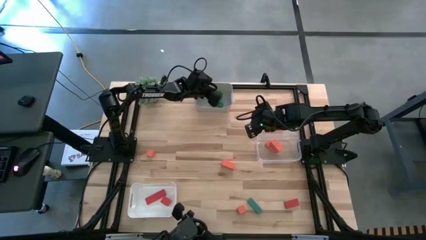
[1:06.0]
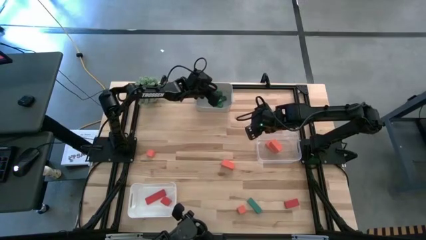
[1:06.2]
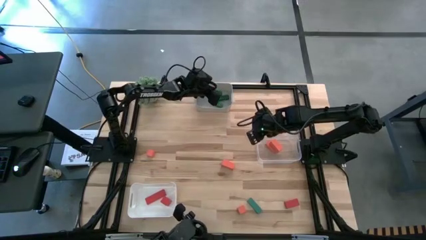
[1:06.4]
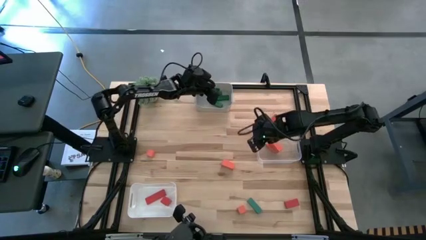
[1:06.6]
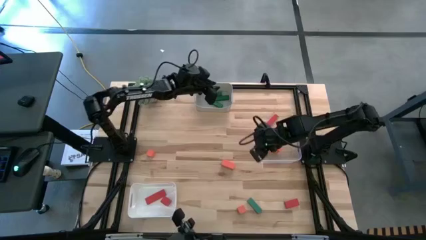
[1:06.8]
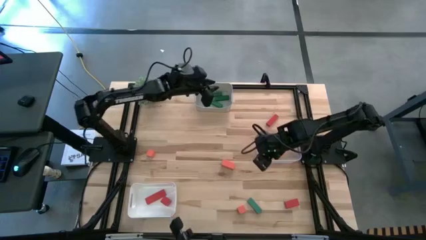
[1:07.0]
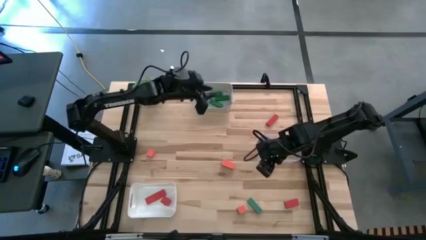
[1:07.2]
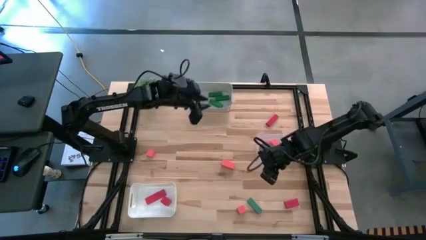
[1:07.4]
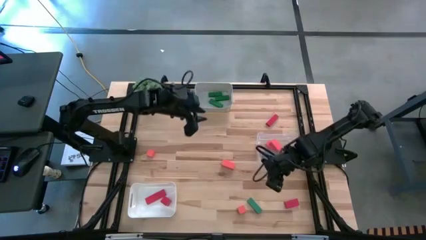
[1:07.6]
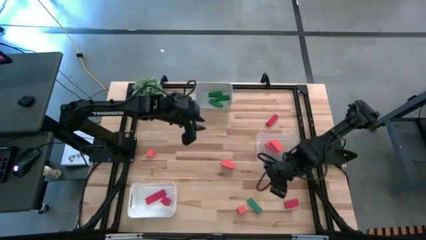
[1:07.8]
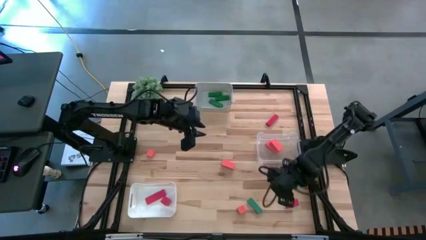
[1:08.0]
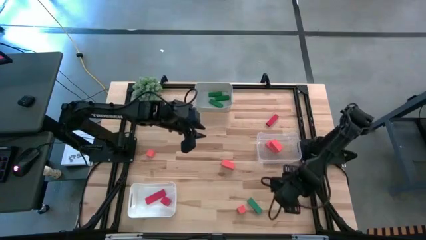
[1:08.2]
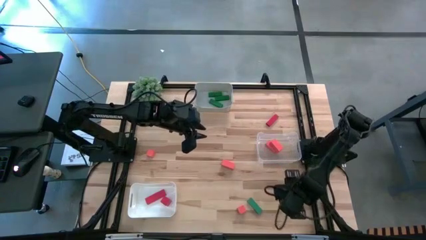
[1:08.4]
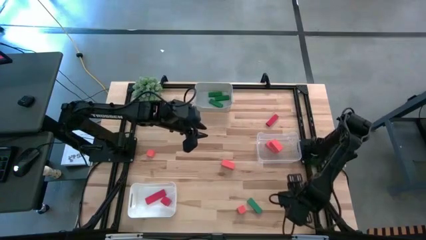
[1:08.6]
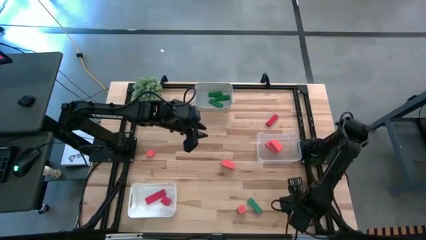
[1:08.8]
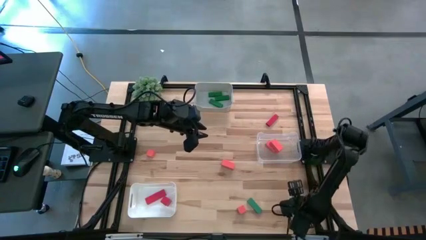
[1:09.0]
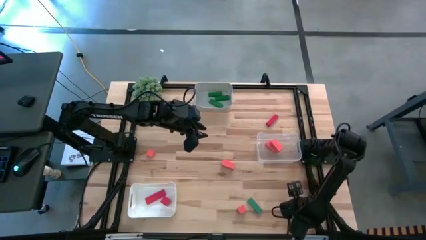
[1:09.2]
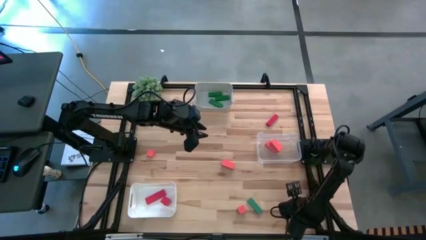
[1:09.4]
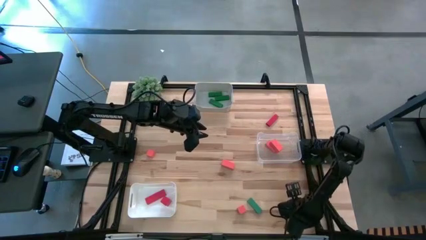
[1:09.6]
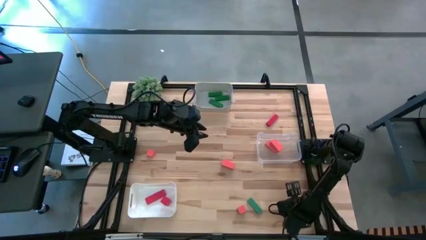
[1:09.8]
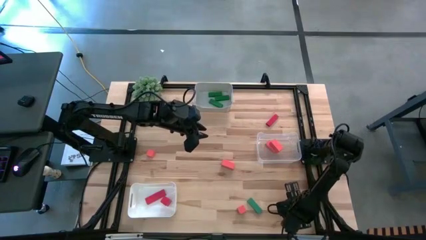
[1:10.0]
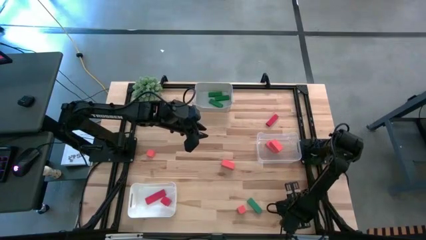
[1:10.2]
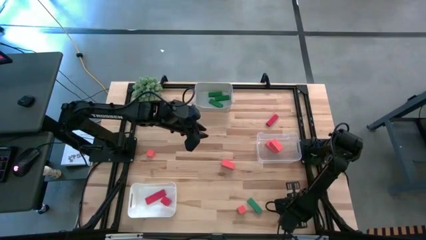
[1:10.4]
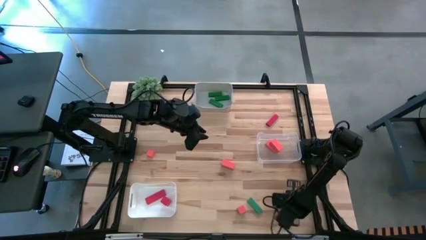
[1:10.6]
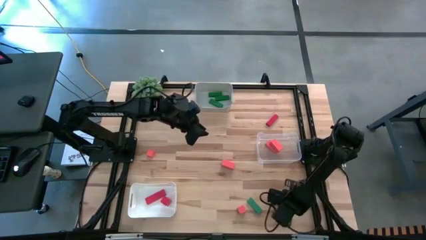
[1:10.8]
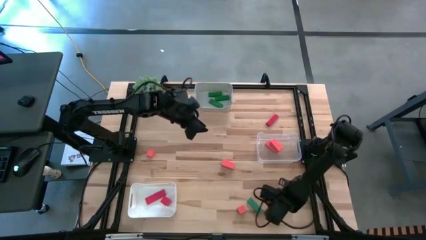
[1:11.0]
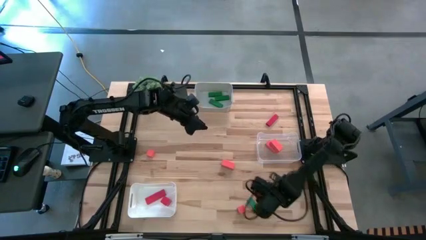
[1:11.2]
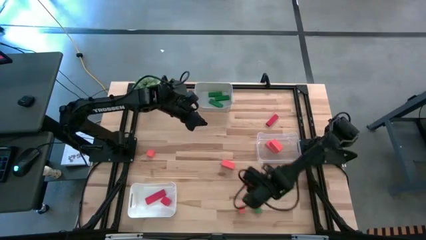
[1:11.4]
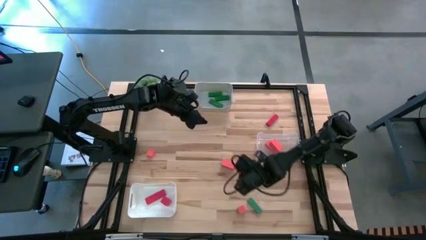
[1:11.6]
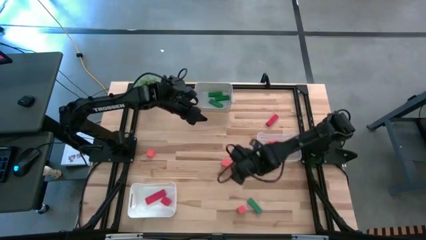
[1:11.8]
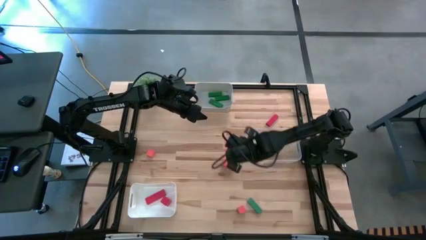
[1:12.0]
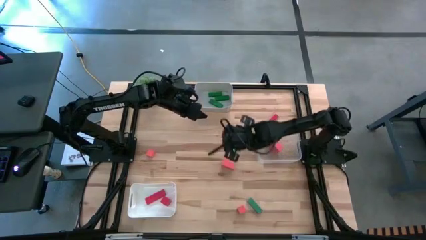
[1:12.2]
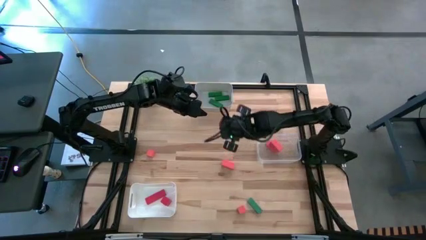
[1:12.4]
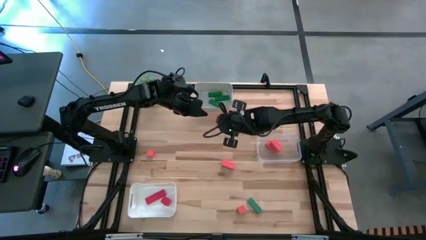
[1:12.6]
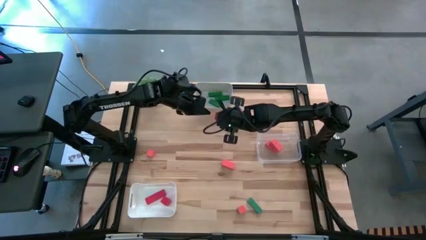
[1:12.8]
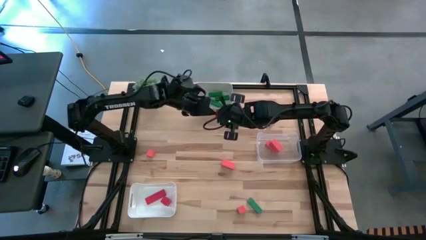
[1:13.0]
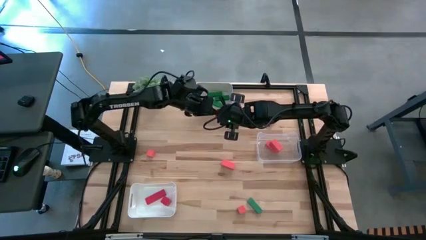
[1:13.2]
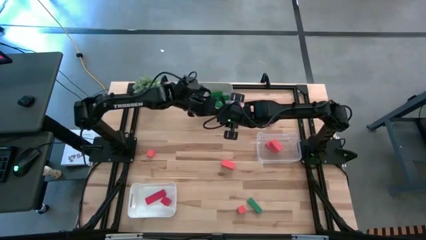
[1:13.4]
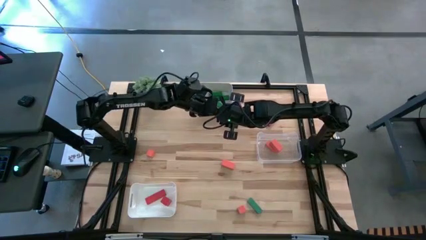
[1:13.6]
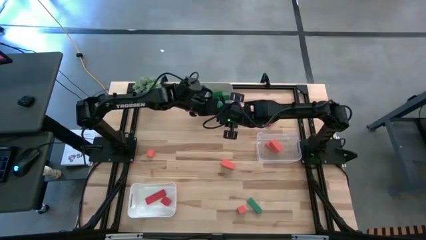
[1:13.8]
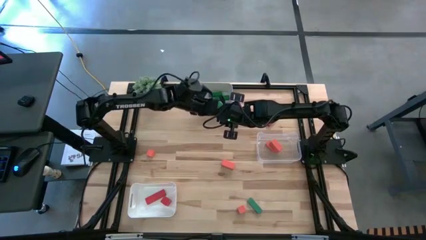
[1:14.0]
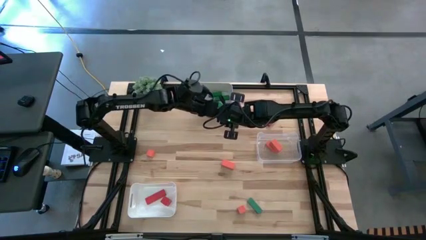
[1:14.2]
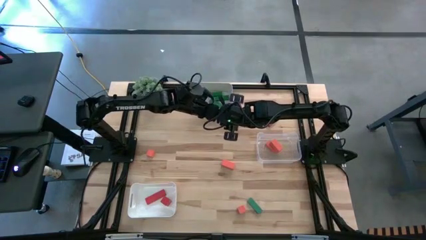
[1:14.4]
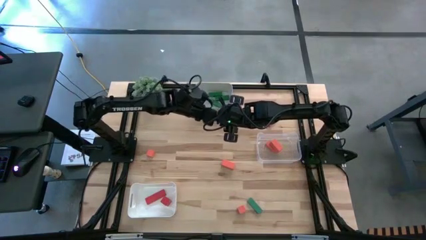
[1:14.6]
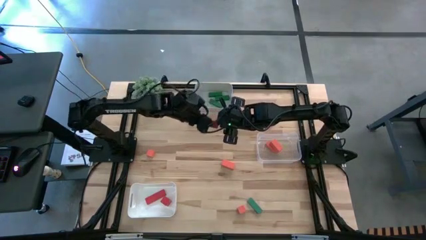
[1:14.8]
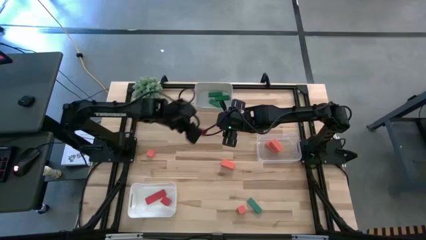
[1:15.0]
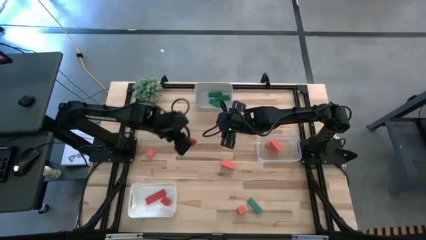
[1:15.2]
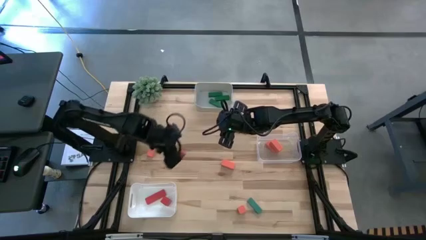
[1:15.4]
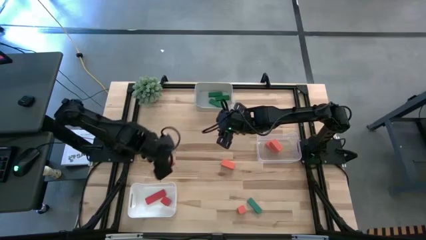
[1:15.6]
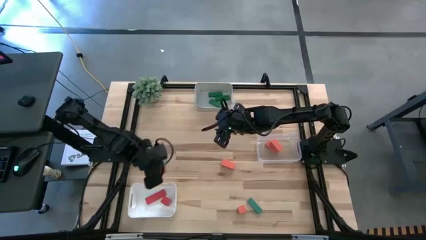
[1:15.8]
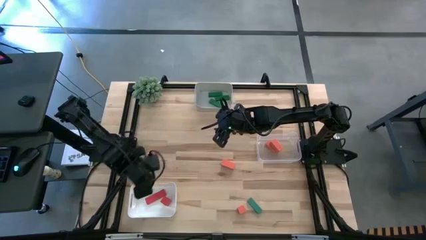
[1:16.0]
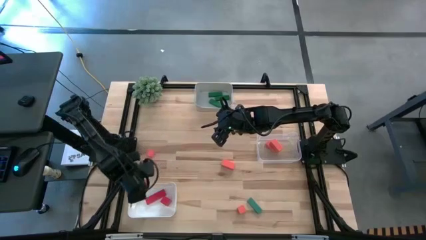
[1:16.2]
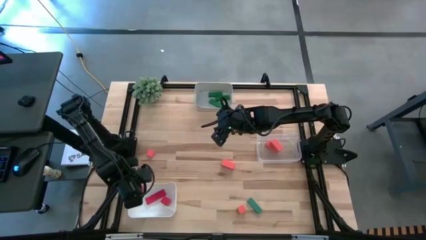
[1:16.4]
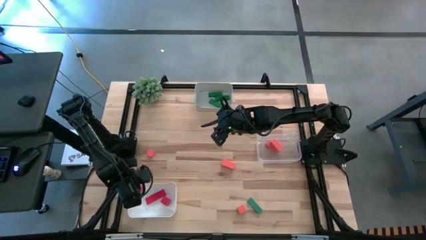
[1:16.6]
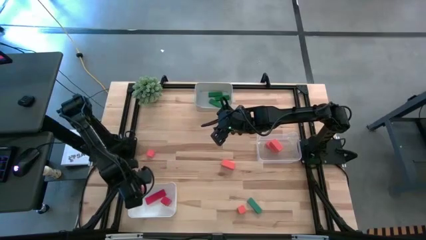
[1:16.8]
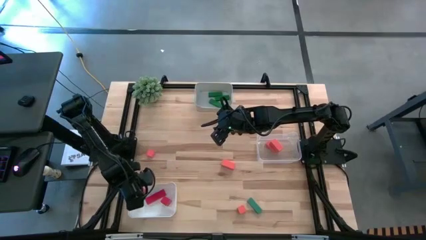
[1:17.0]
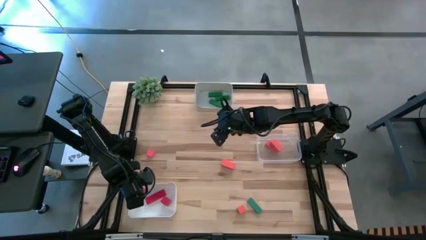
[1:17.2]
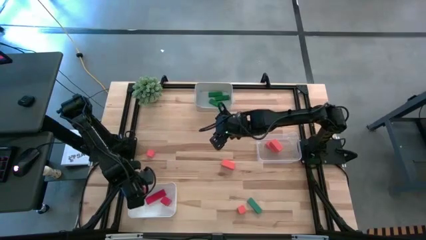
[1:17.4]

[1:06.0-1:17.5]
Task: Sort & place blocks by color
Put the red block into the white bin

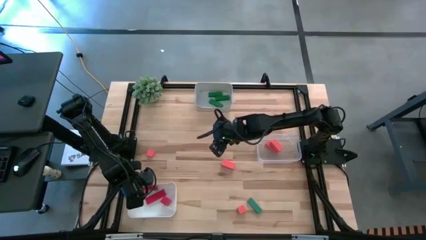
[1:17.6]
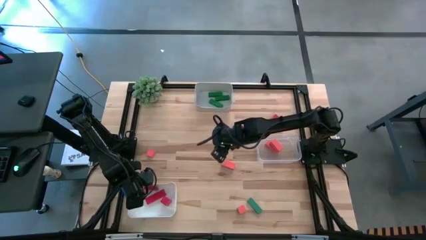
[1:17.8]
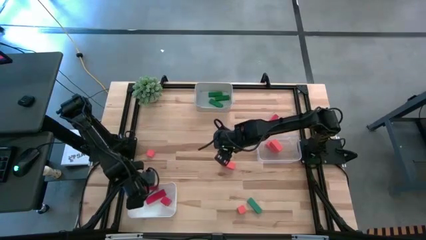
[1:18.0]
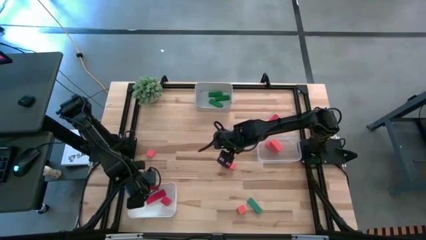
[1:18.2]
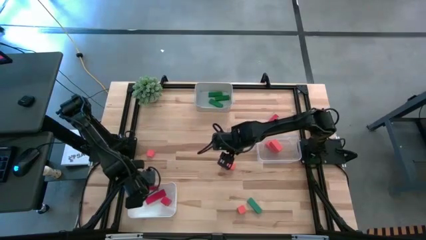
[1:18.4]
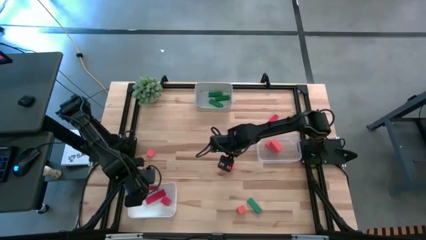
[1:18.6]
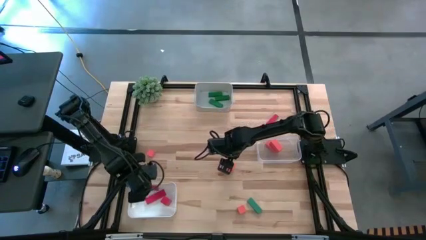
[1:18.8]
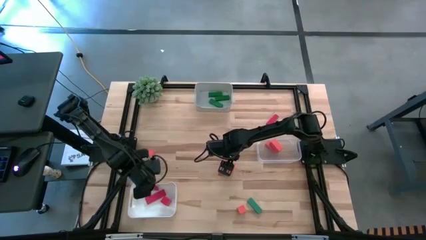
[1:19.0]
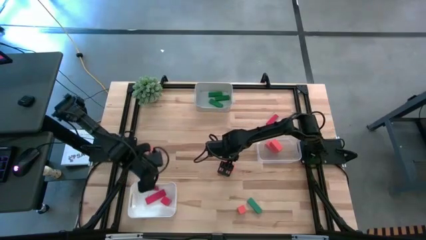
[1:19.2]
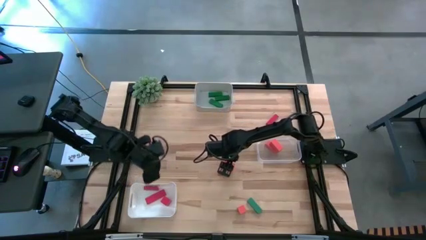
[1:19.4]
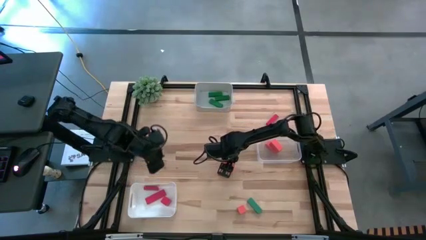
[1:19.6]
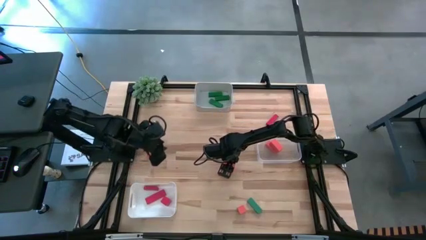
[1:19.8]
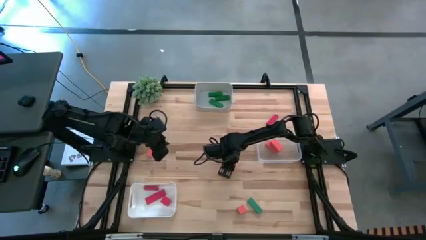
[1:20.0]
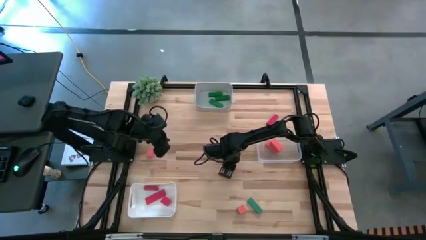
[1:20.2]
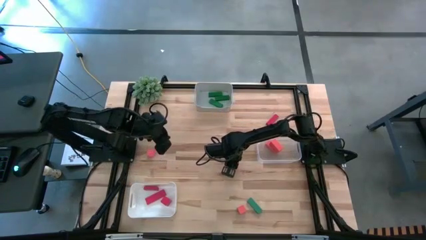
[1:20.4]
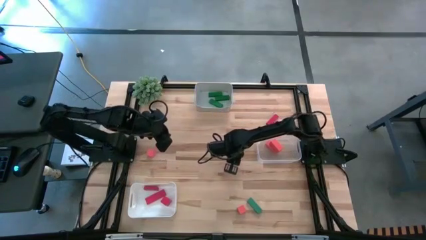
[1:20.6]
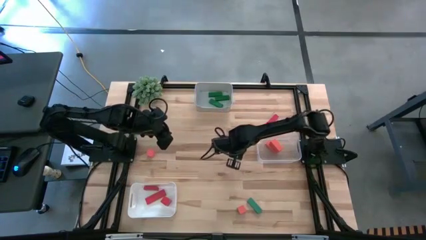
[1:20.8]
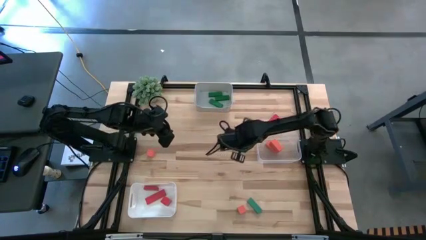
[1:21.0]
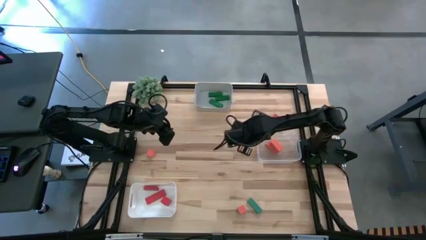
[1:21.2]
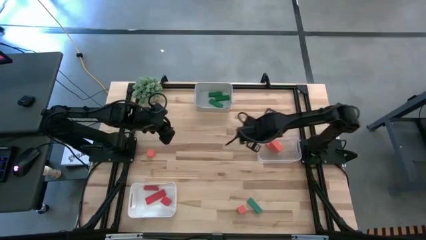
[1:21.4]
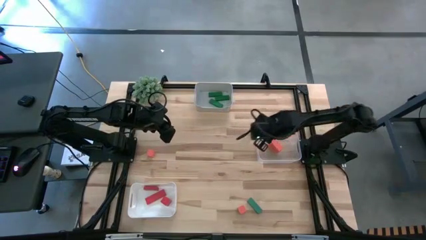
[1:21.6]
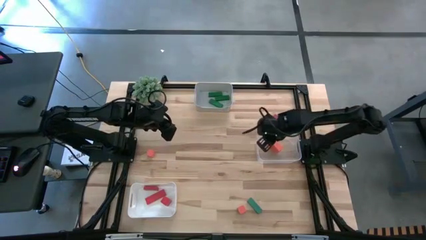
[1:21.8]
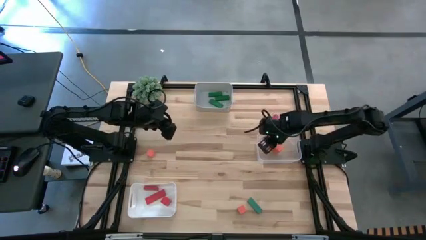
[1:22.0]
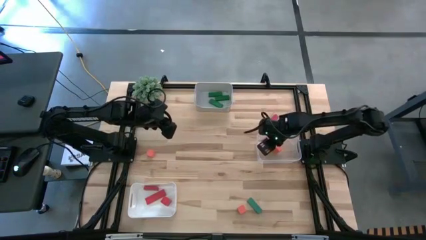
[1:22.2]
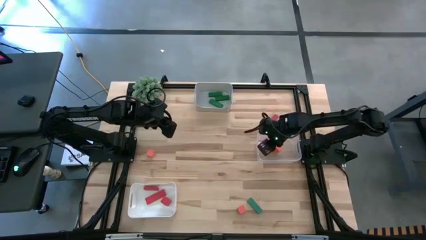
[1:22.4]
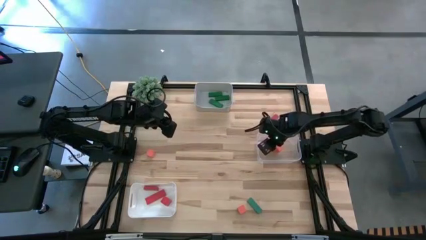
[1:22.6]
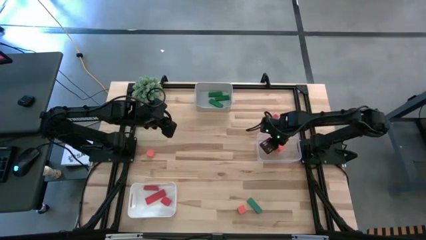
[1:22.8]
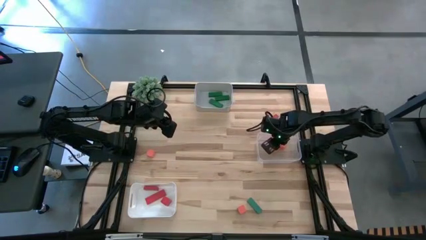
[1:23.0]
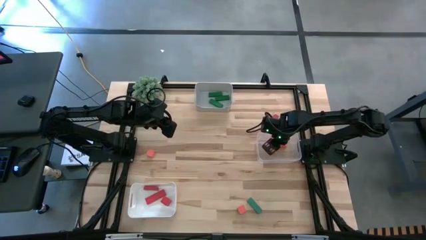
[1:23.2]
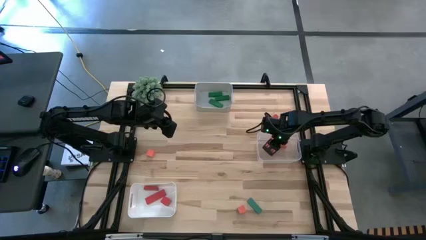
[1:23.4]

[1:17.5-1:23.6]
Put the orange block into the transparent bin
